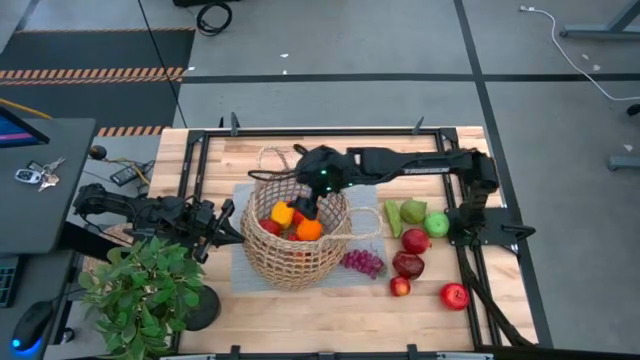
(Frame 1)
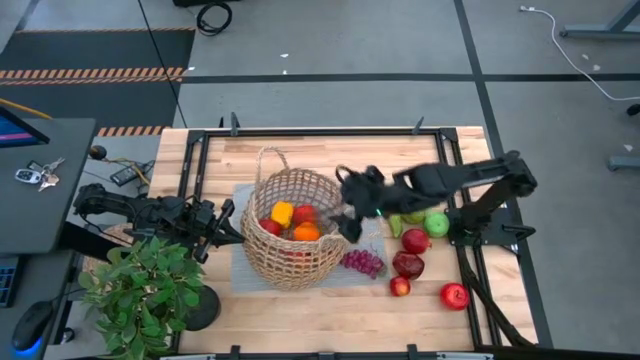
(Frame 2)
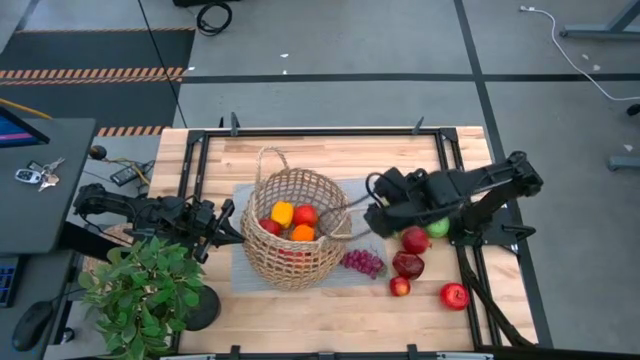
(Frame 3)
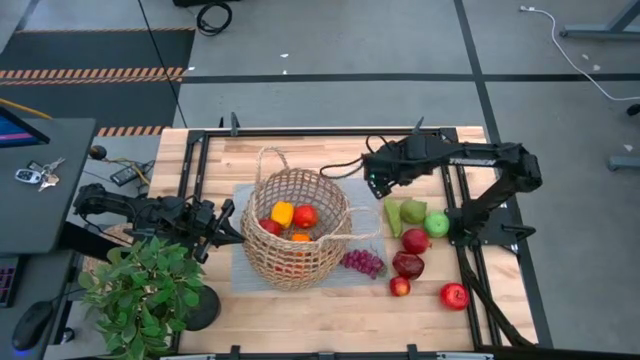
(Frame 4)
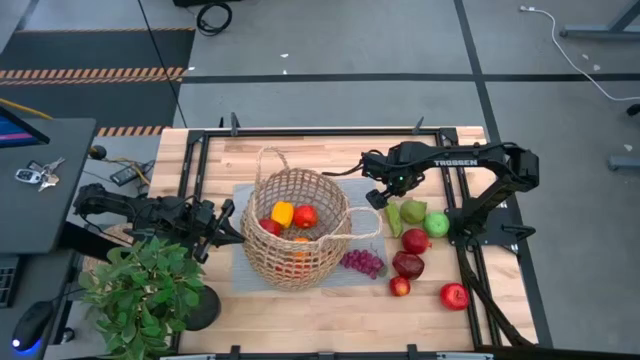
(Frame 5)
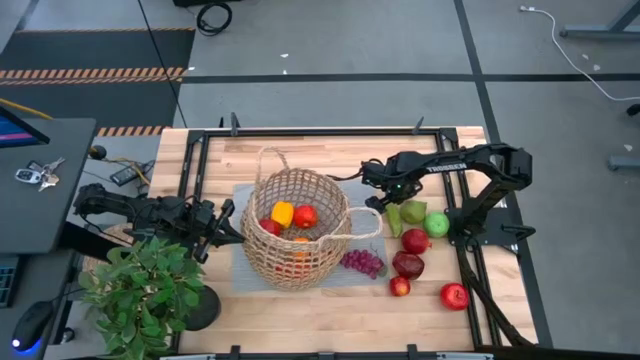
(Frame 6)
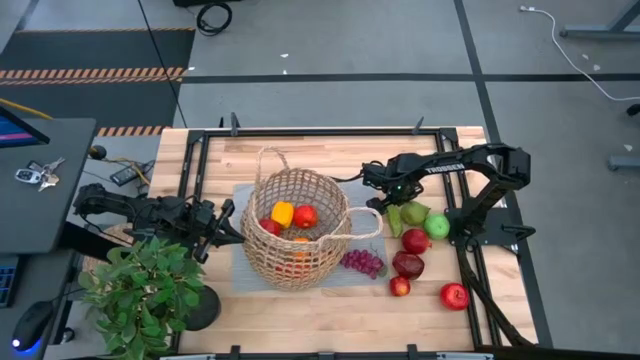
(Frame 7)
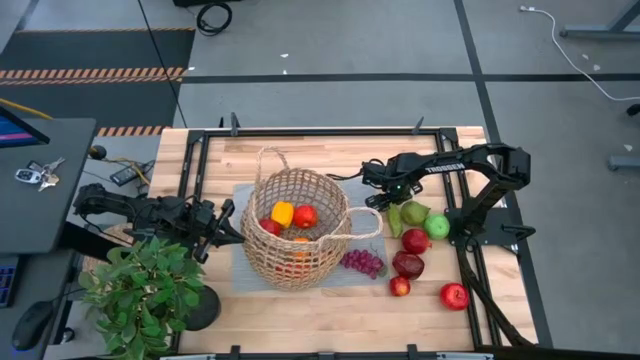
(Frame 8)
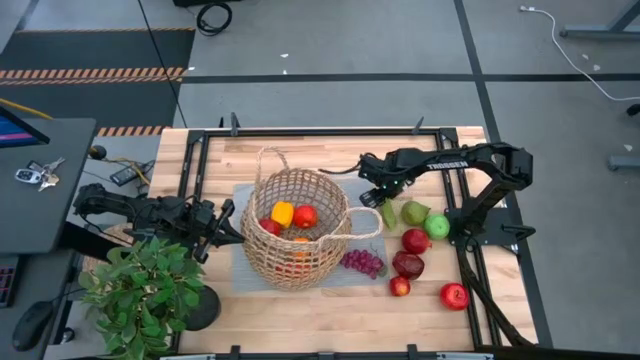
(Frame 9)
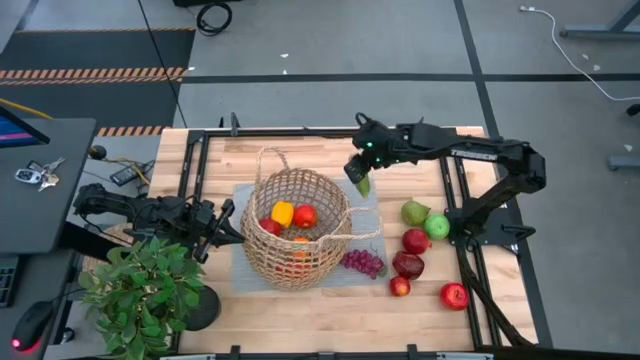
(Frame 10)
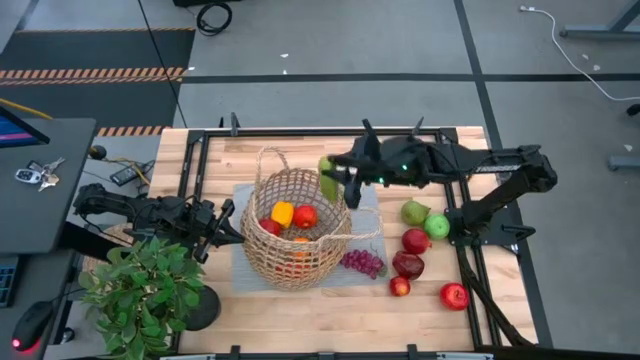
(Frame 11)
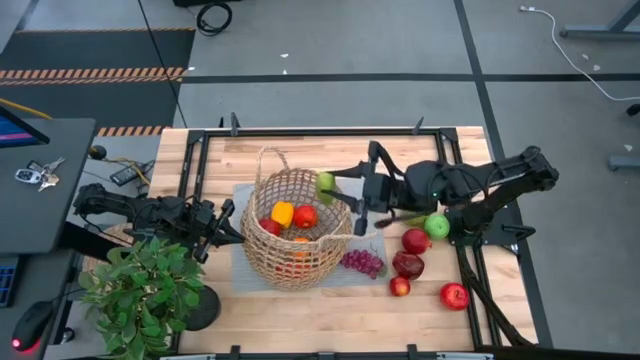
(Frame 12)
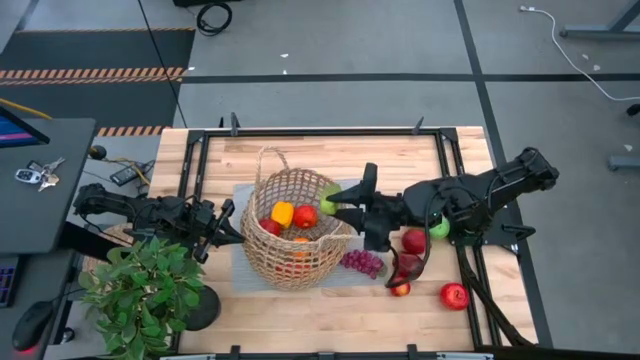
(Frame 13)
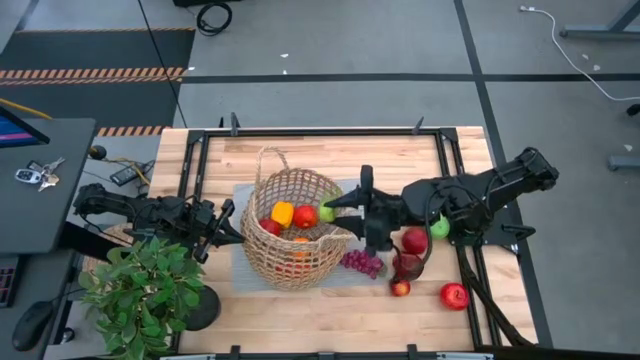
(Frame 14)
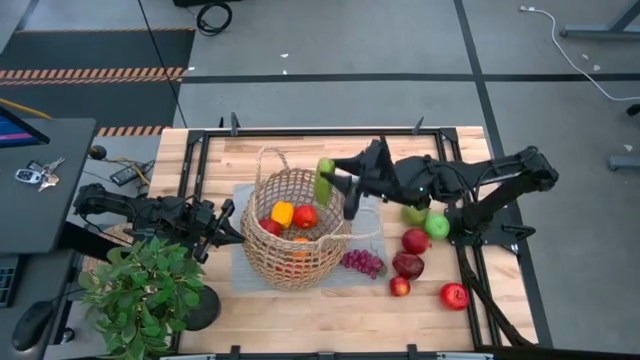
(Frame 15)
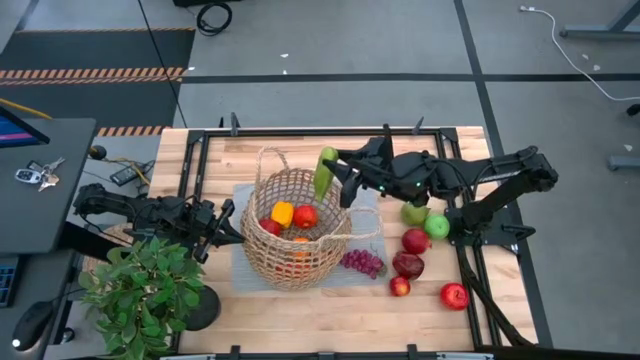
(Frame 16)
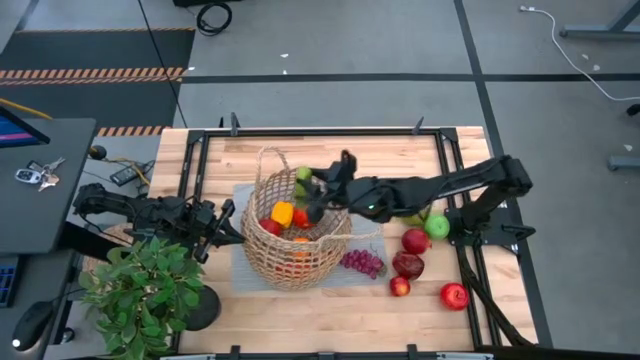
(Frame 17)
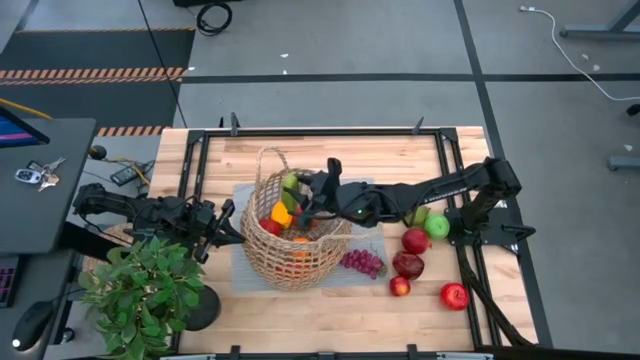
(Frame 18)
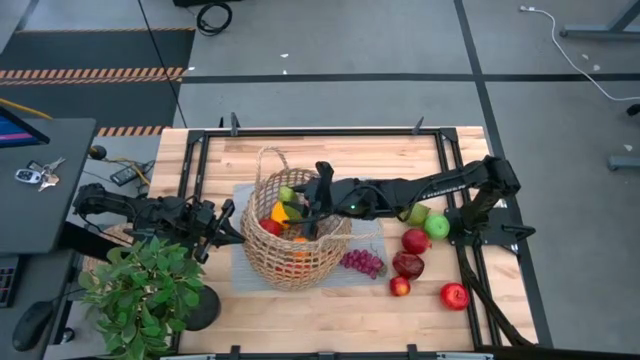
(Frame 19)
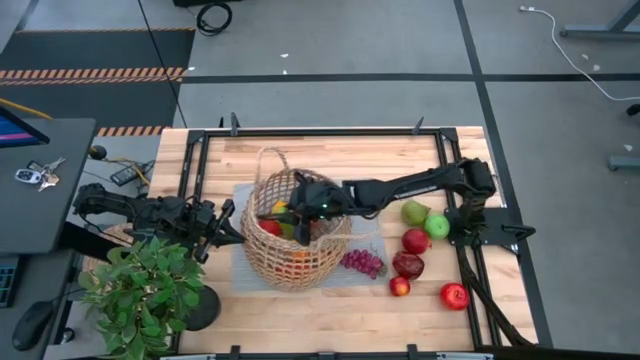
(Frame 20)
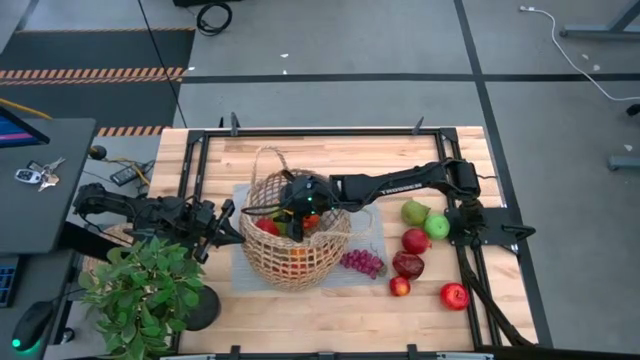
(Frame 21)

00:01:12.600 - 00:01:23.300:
Task: Build produce basket
Put the green cucumber into the basket

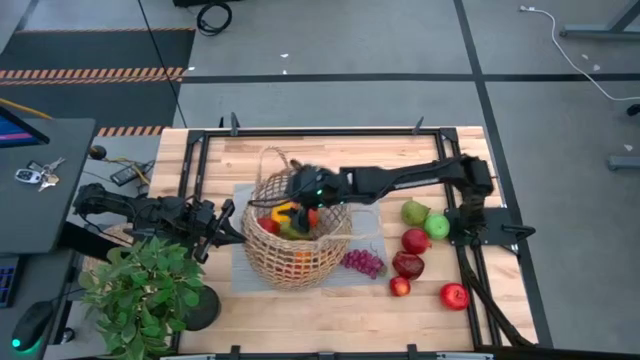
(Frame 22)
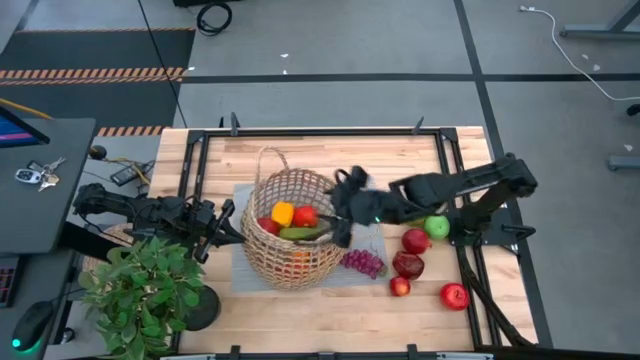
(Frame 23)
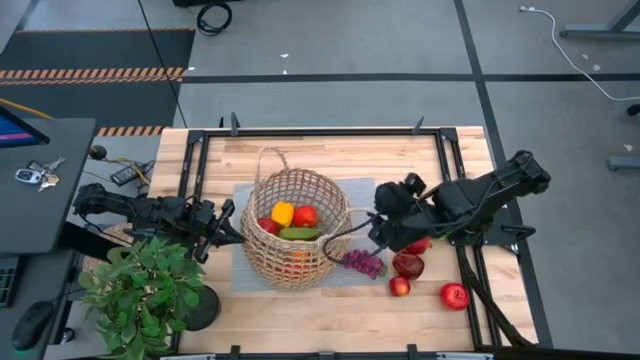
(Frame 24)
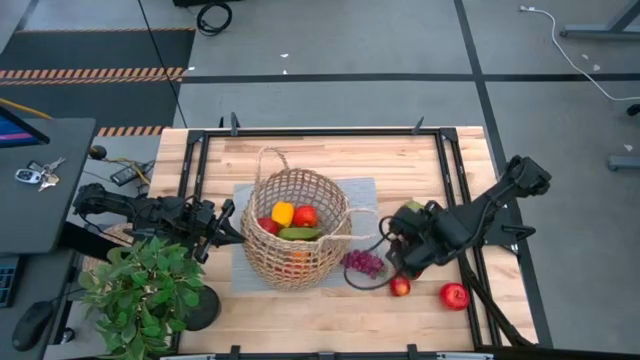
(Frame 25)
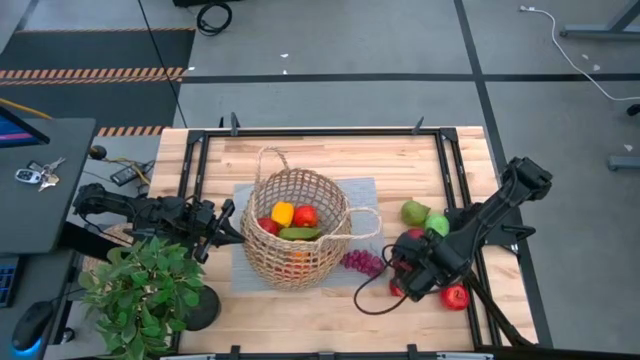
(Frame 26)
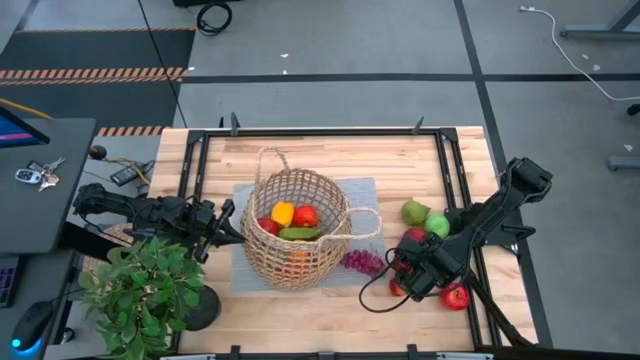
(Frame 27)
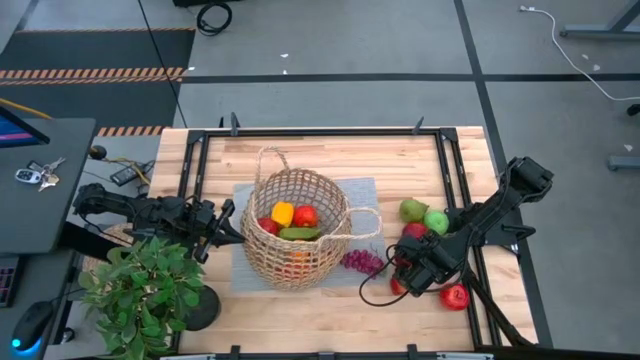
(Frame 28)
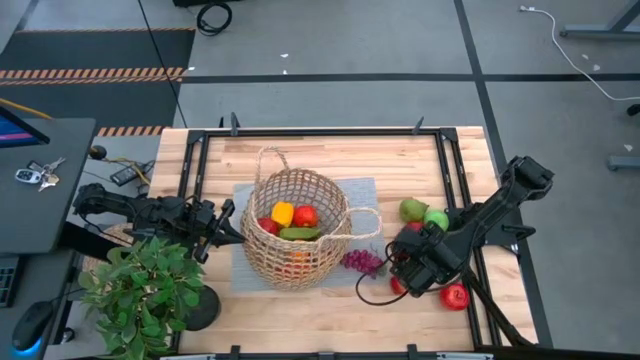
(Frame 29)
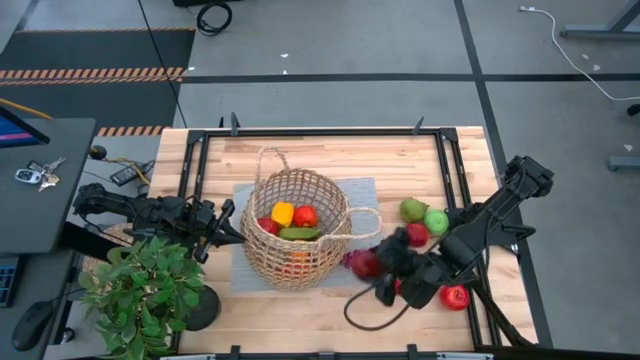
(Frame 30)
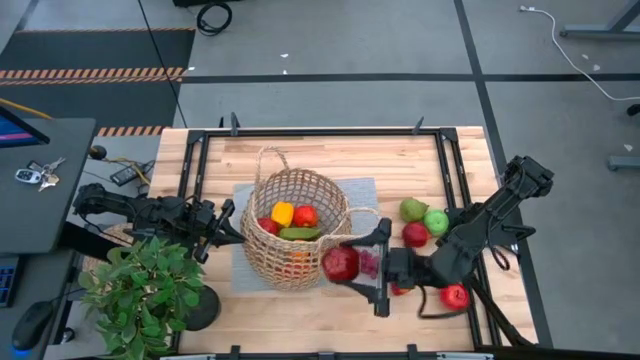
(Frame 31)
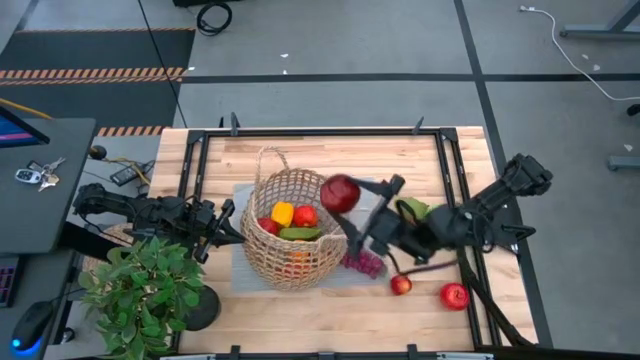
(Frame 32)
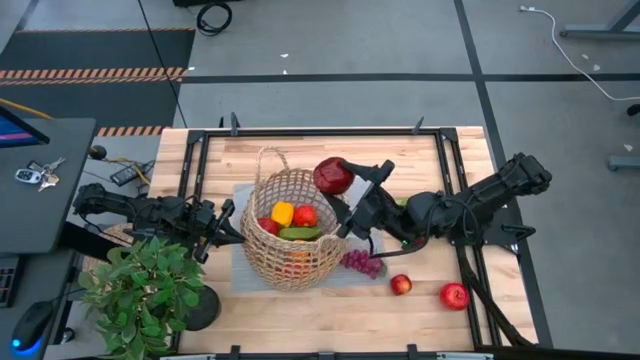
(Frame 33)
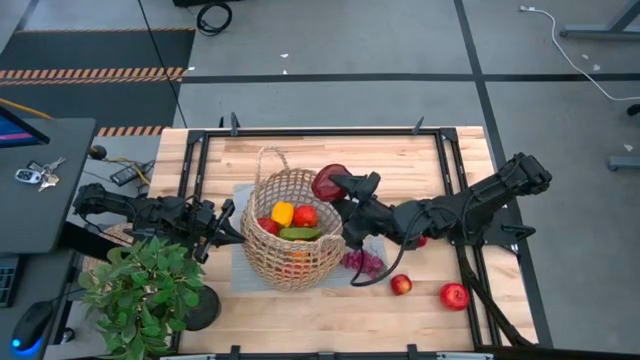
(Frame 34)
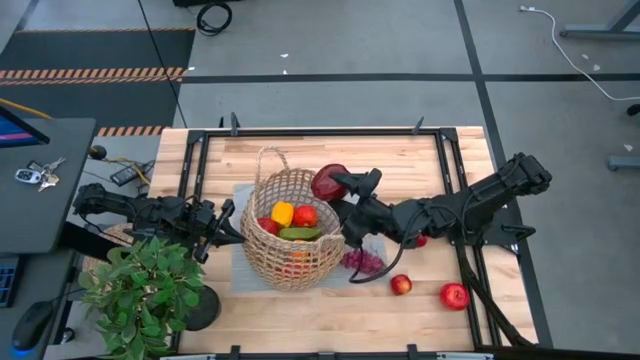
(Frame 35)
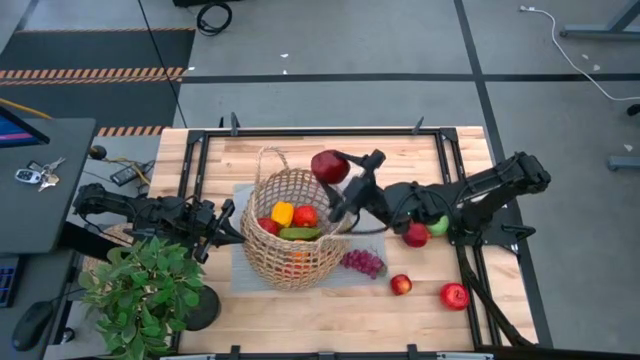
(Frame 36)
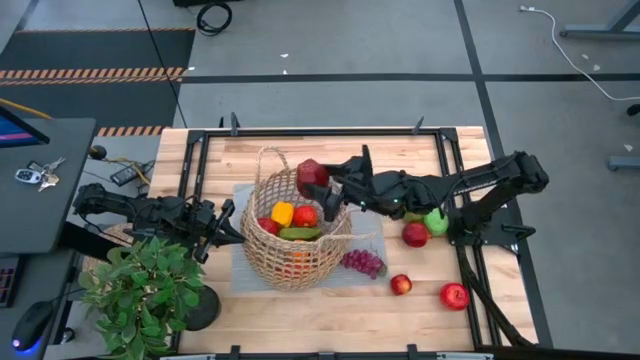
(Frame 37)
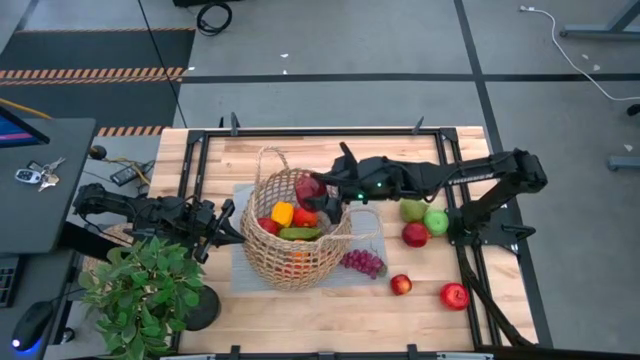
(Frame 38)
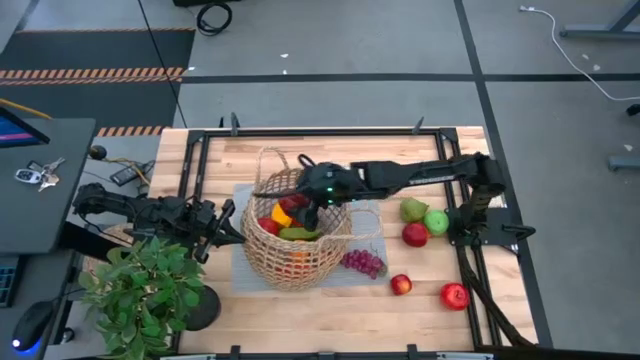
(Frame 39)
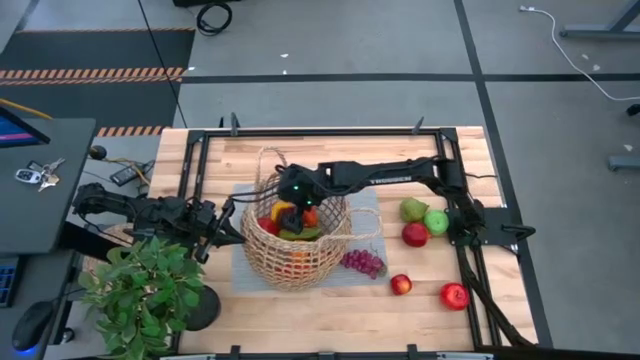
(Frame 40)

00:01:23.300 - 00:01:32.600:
Put the dark red apple into the basket
